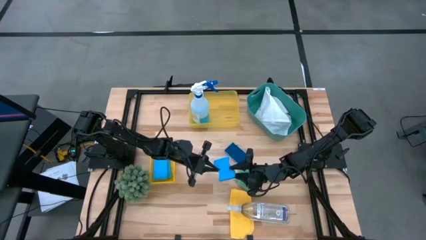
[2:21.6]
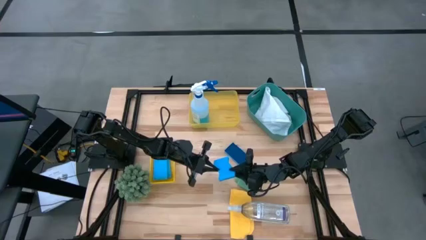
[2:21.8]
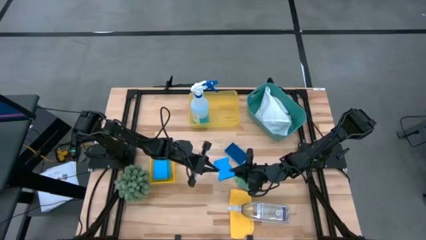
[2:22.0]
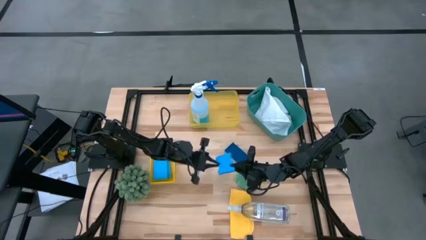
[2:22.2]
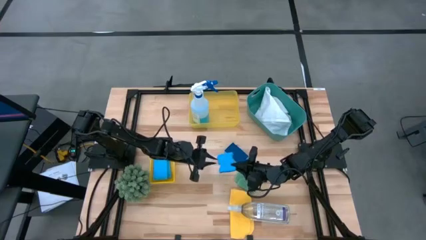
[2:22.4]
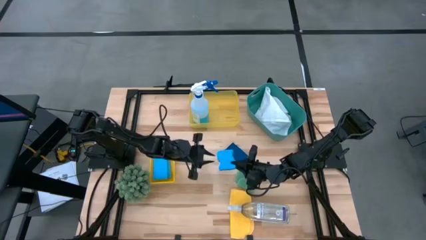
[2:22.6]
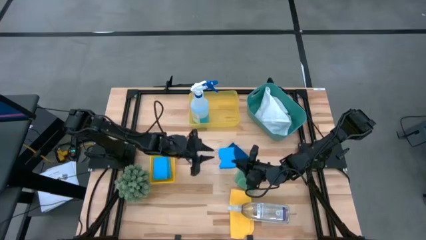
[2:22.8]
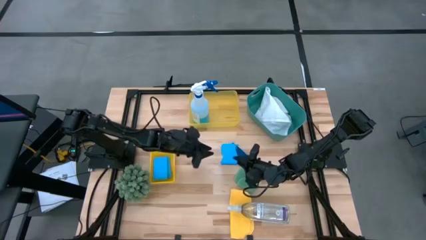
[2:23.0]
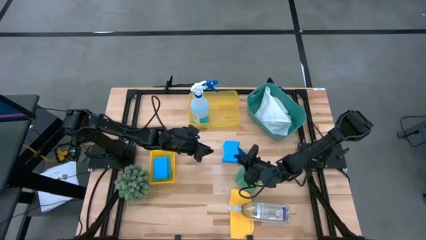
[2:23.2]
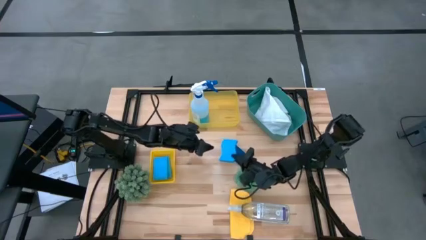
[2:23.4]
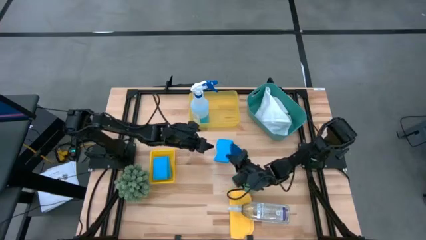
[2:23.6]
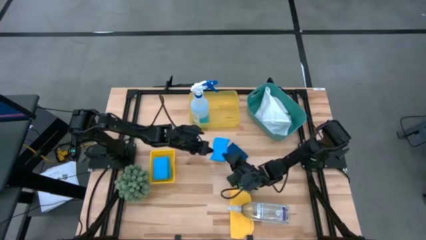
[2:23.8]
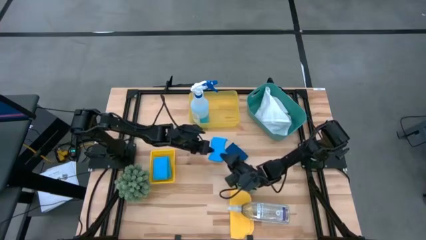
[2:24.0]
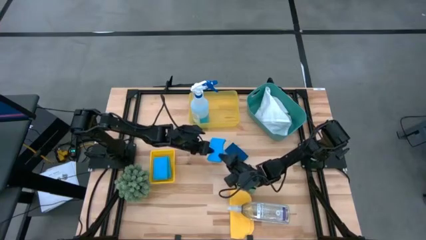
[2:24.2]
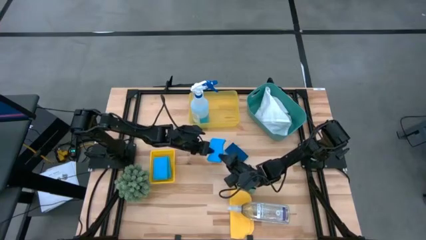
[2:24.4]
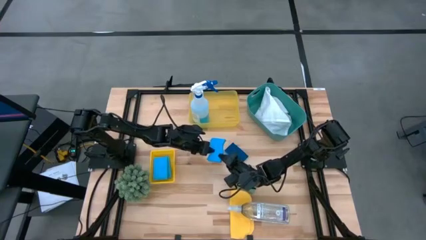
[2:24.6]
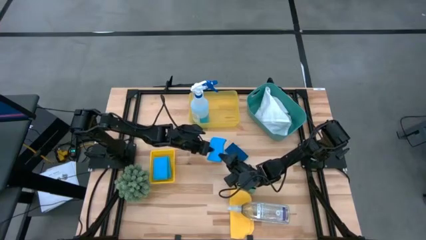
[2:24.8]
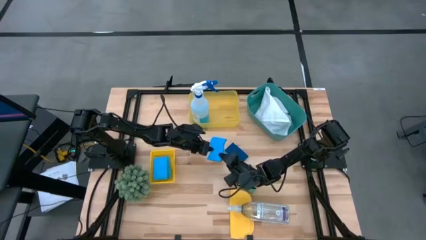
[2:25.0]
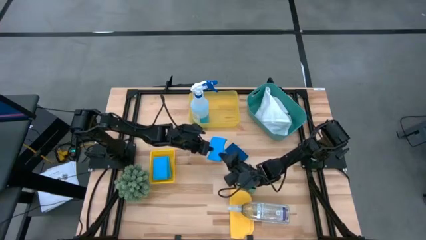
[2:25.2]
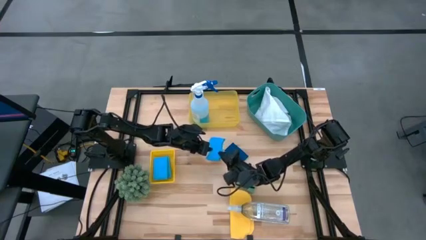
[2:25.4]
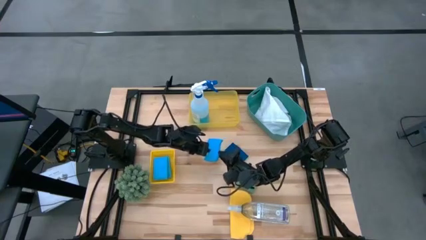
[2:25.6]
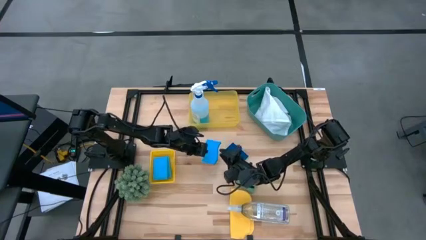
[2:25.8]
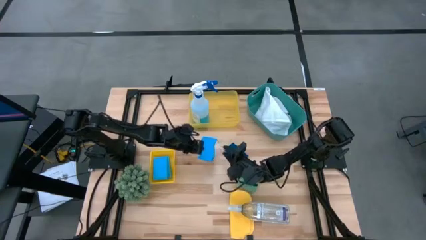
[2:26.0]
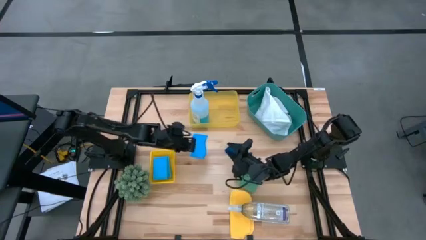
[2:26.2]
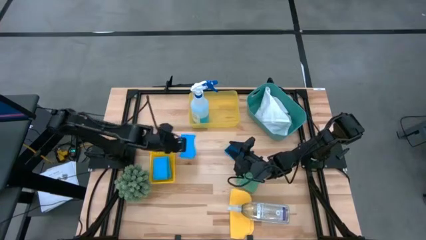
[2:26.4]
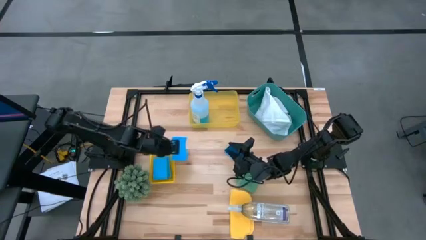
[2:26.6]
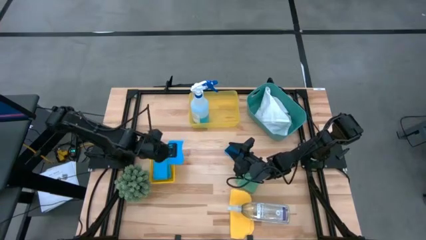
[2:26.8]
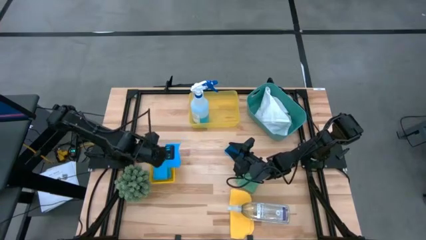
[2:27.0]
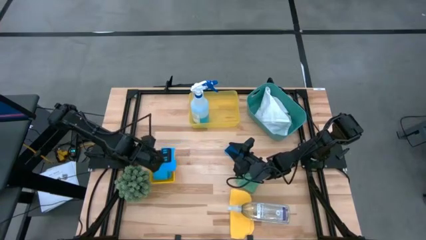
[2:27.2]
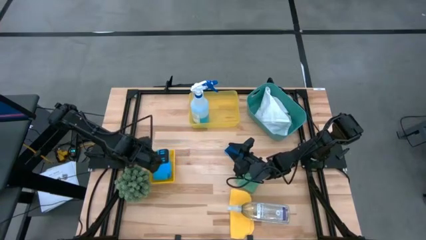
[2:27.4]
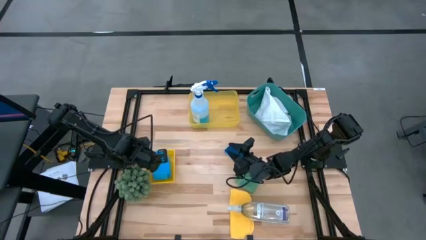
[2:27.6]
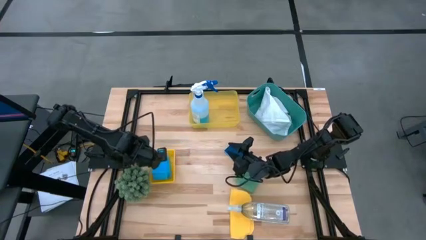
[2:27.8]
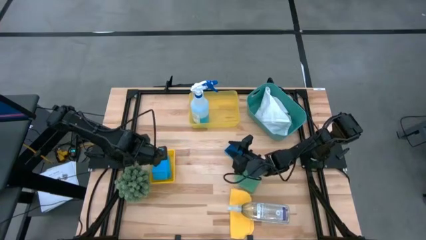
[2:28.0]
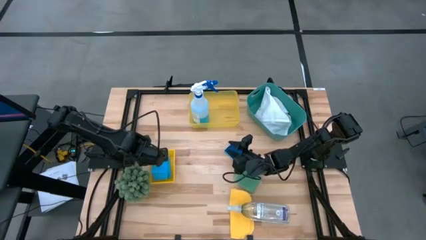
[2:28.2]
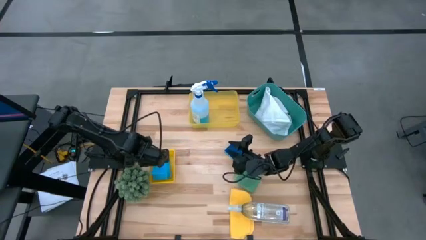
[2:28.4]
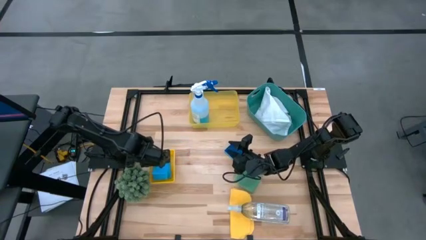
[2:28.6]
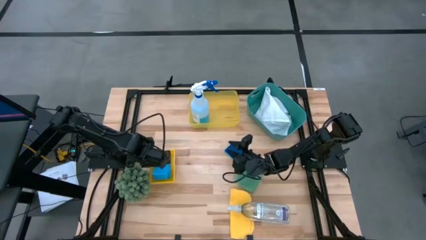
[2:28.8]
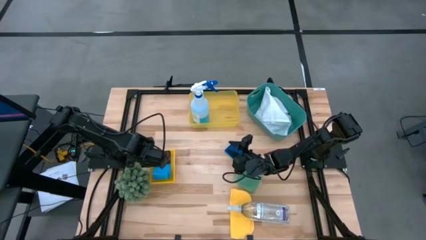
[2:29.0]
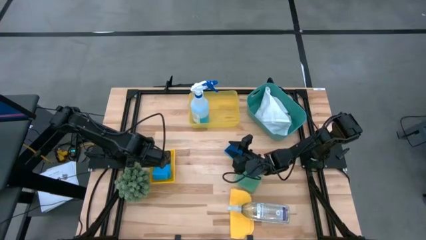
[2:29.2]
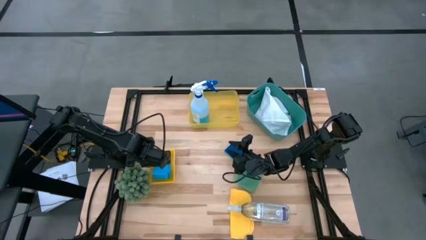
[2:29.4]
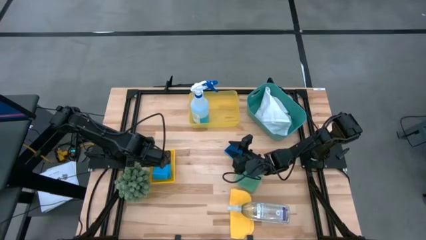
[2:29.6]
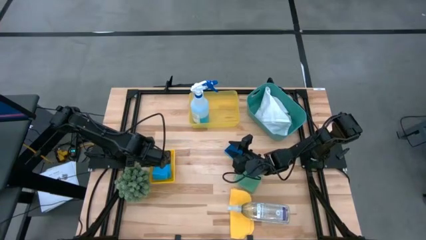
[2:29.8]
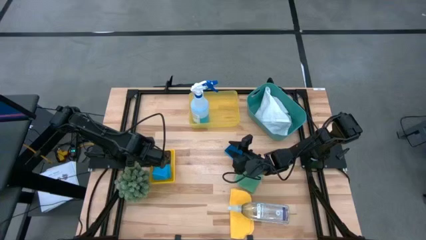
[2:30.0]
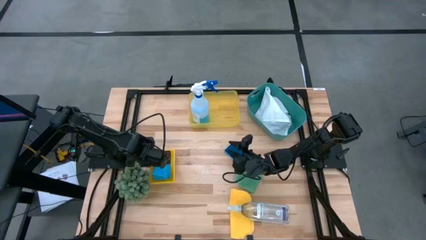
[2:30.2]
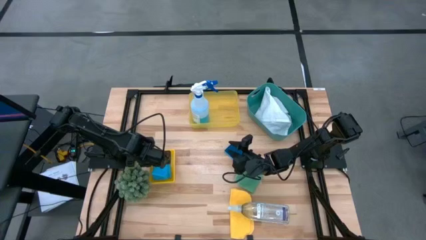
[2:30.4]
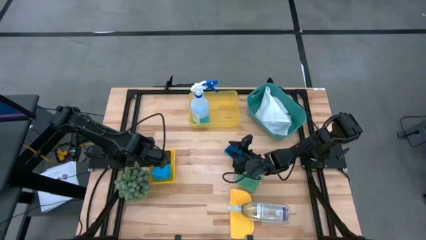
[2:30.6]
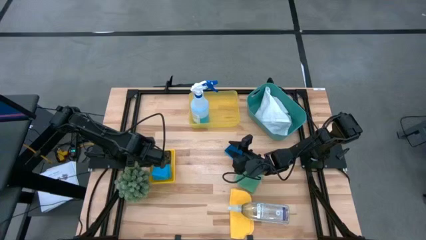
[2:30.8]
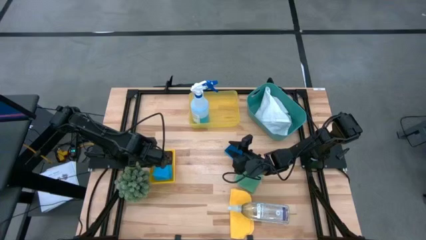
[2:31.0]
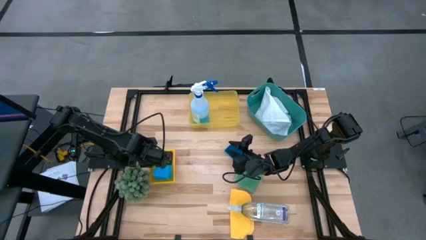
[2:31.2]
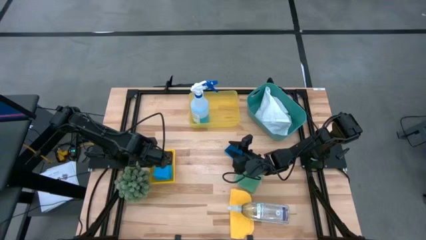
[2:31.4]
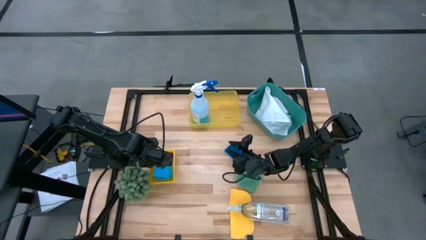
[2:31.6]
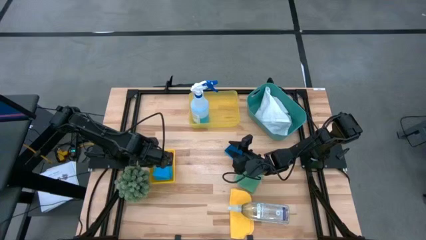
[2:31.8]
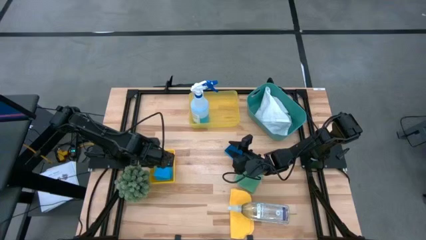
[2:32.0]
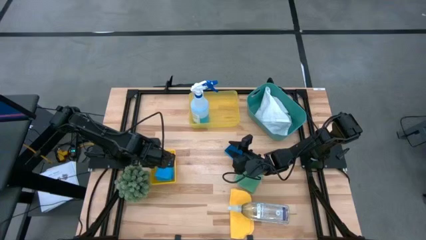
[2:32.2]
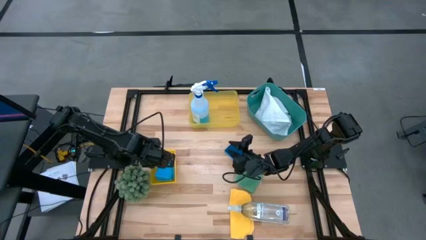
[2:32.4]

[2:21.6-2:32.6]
Task: Pick & Place Kitchen Items
Put the blue sponge into the bottom yellow bin

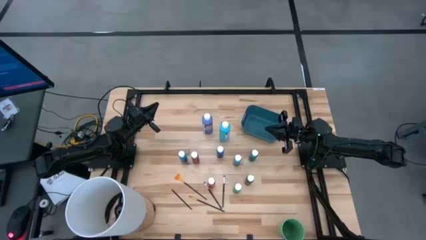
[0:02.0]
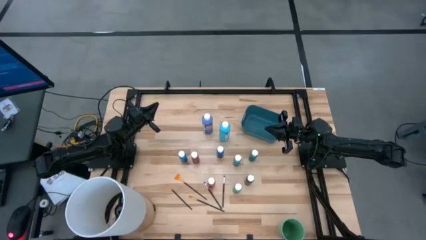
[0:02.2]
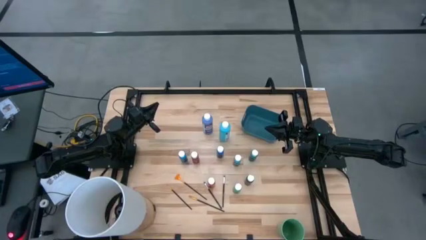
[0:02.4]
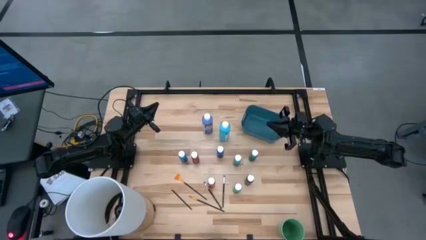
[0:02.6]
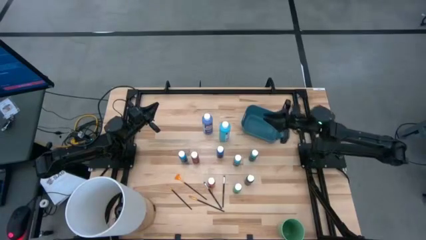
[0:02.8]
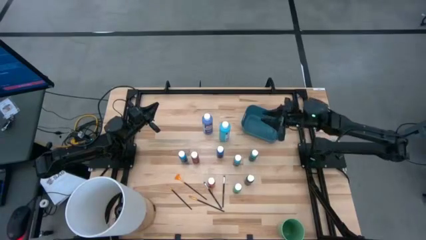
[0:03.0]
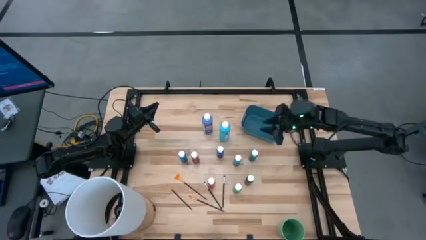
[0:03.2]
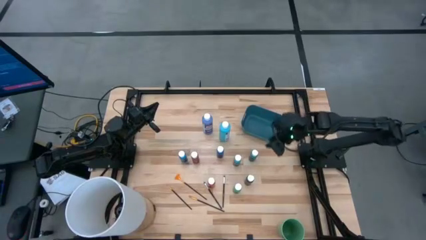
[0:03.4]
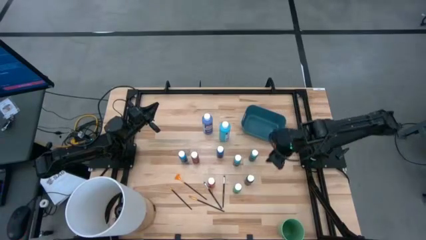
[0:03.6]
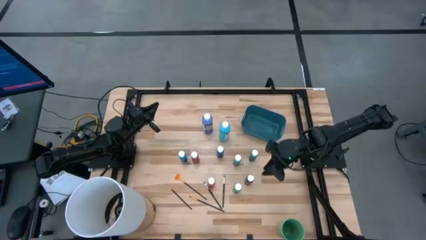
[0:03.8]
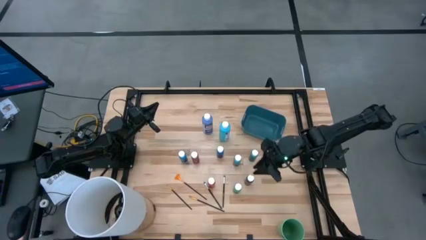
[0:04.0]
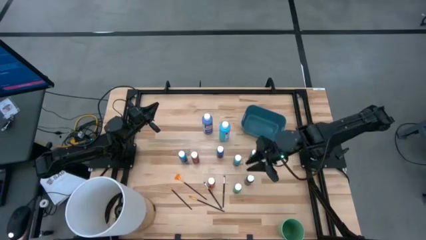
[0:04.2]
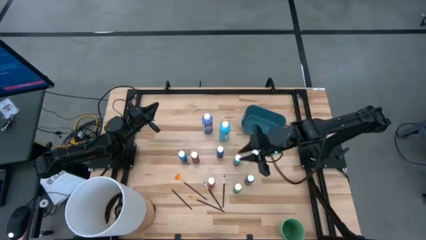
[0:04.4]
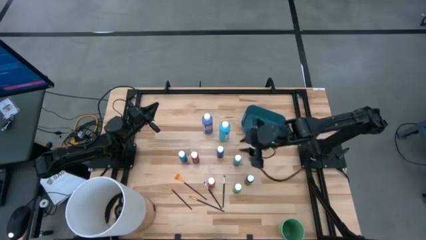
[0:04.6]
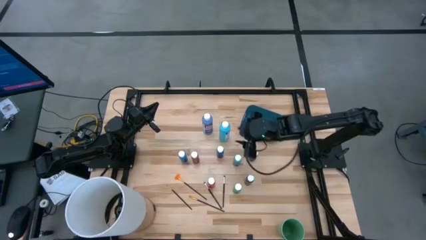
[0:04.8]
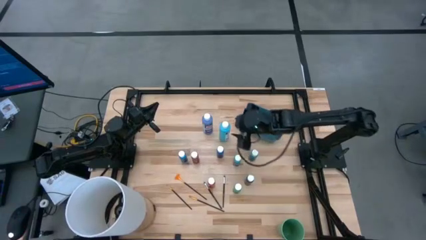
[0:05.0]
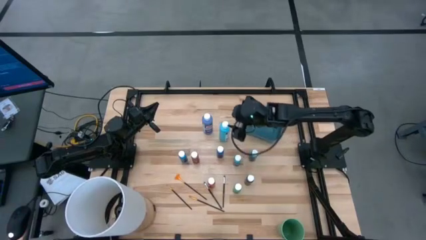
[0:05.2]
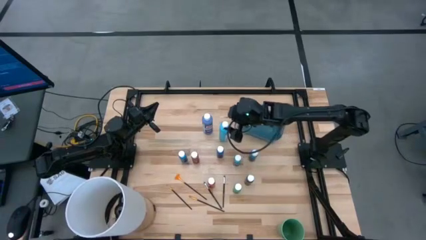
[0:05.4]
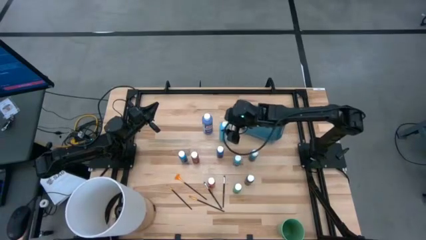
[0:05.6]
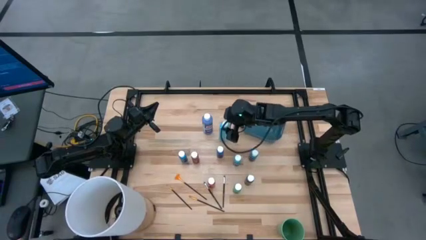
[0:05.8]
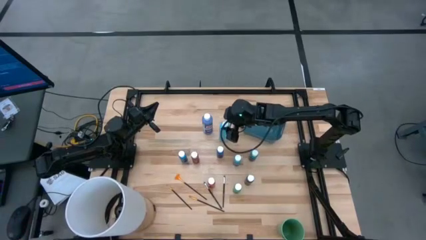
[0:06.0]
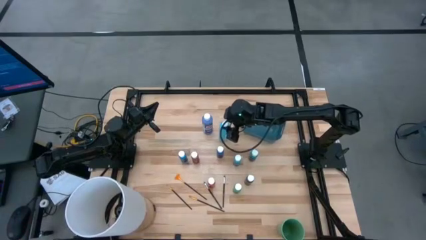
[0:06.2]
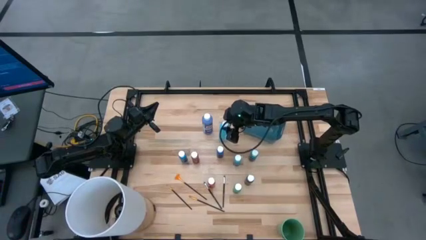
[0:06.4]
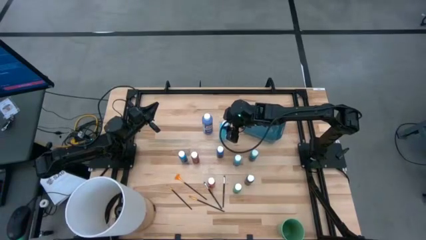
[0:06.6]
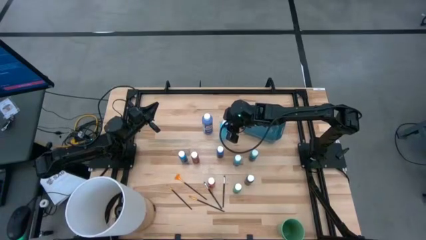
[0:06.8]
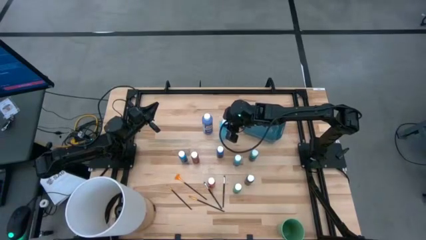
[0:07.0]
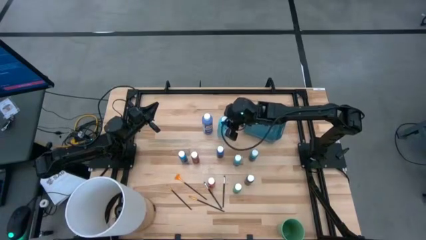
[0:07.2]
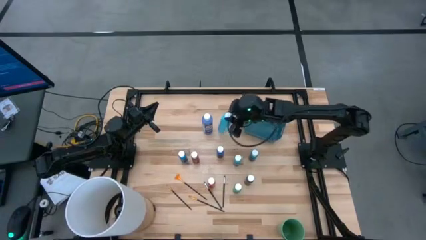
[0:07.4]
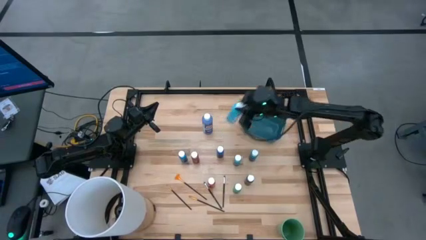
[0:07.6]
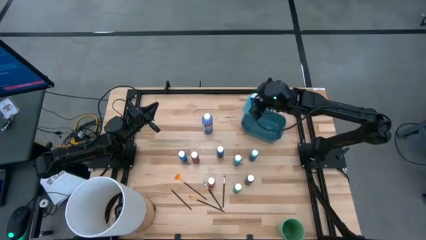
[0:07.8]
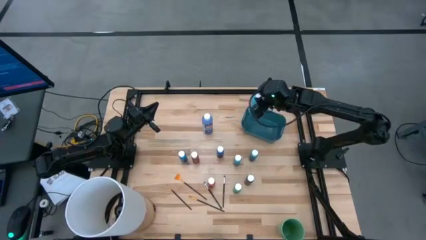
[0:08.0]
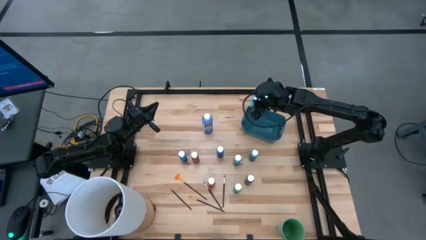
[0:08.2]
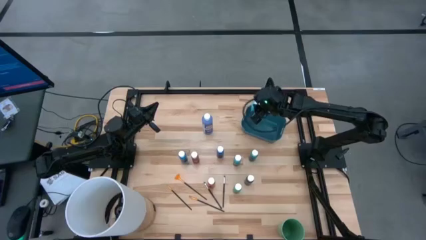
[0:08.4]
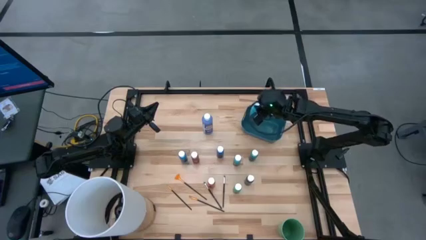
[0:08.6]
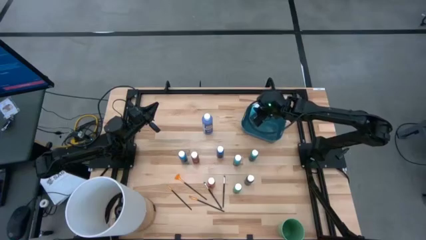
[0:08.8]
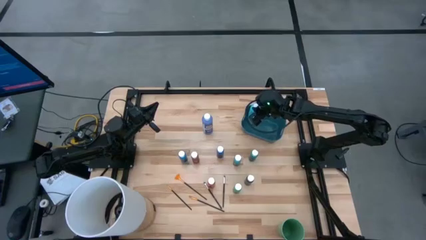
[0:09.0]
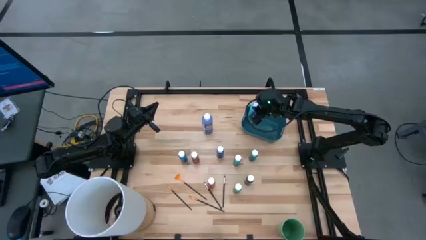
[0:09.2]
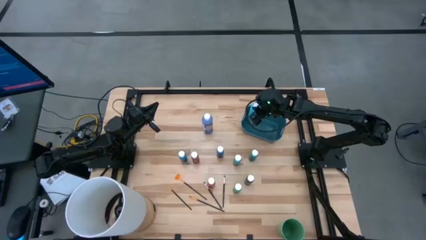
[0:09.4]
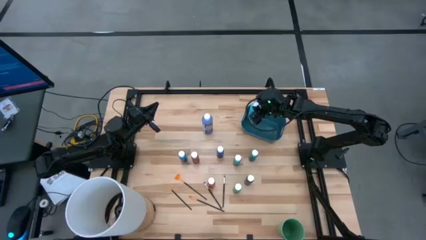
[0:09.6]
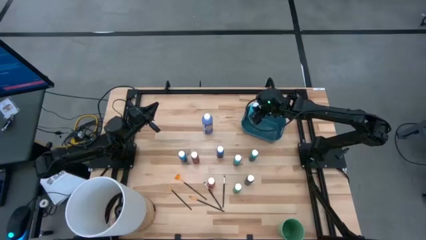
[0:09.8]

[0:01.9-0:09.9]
Task: Pick & Place Paint Supplies
Put the large blue paint bottle into the blue bin
